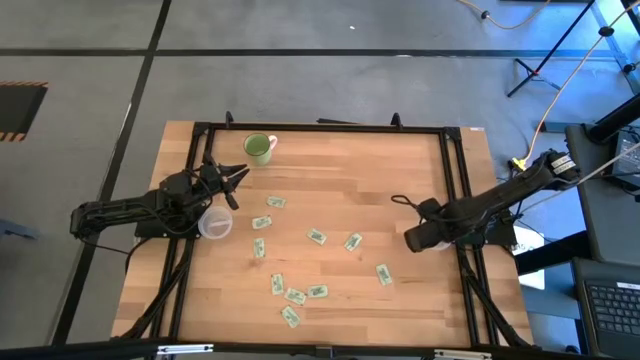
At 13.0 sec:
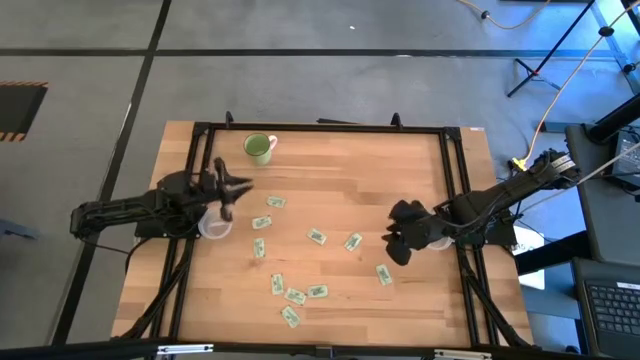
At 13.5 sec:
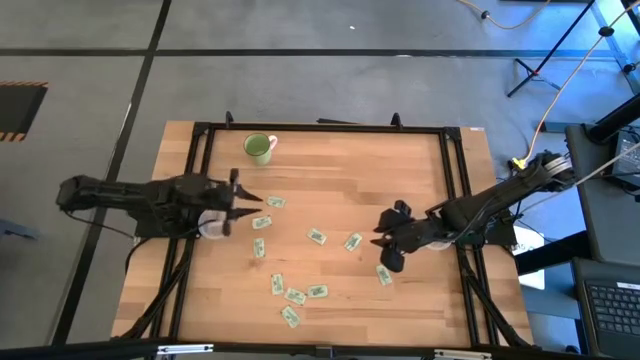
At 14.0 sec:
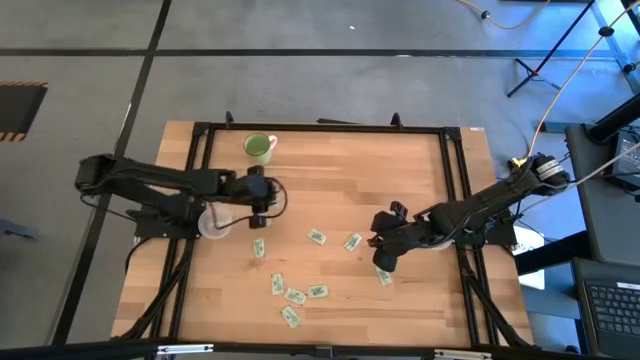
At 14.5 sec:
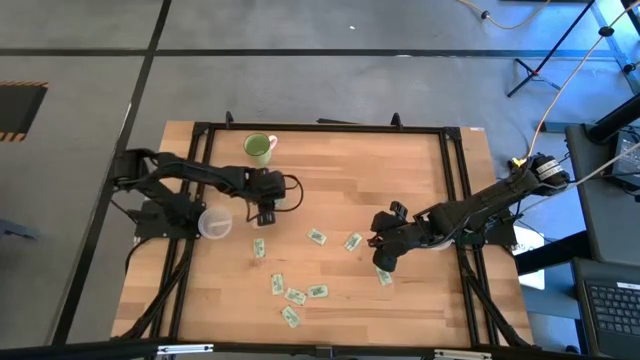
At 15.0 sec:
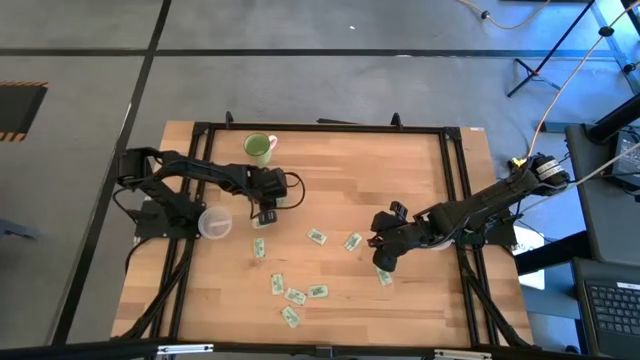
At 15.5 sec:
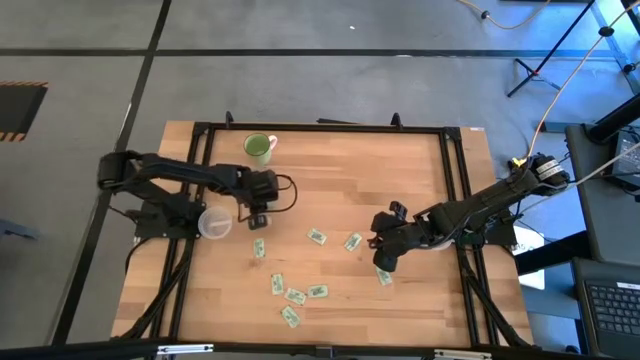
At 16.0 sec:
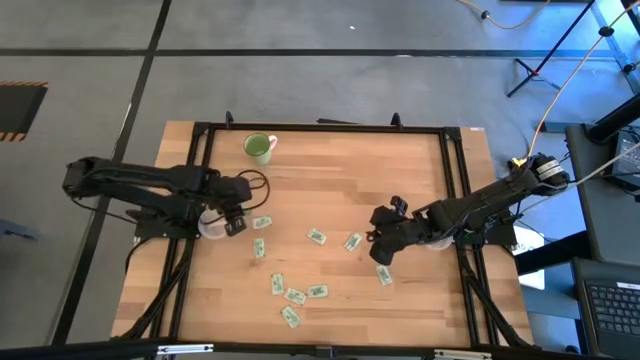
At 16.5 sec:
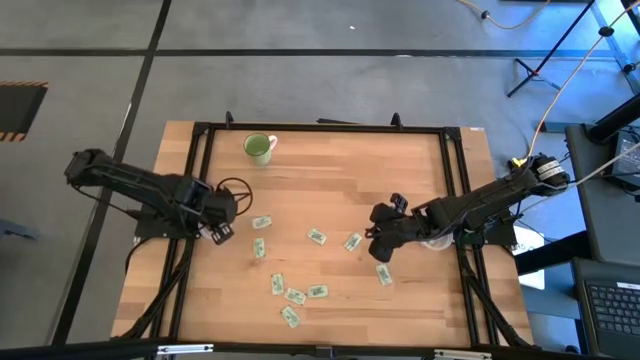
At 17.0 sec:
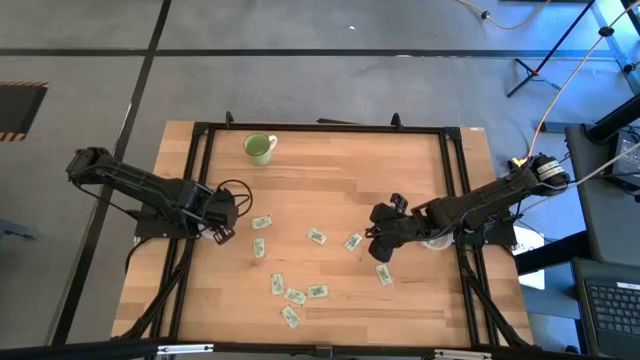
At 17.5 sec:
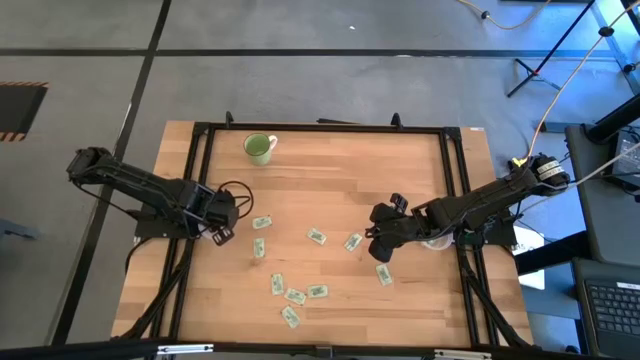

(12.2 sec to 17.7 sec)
Task: Pick and place items into bin
Put the white stevia packet into the left transparent bin

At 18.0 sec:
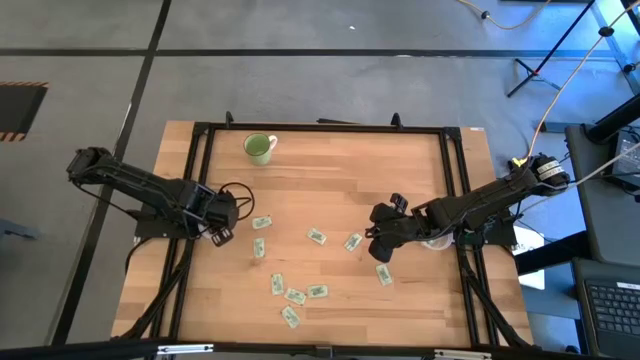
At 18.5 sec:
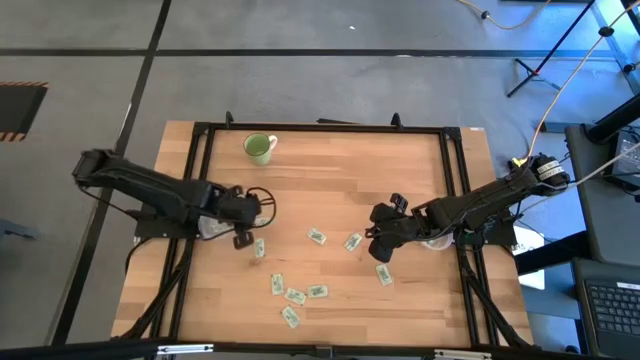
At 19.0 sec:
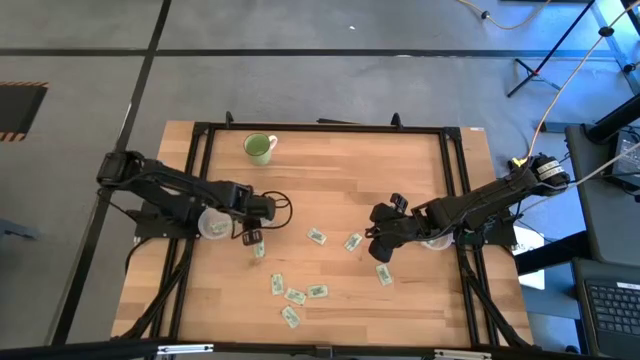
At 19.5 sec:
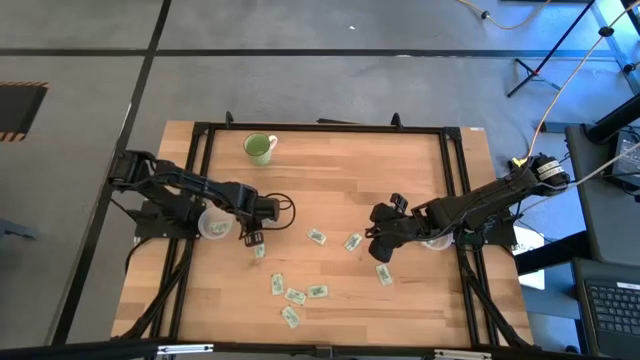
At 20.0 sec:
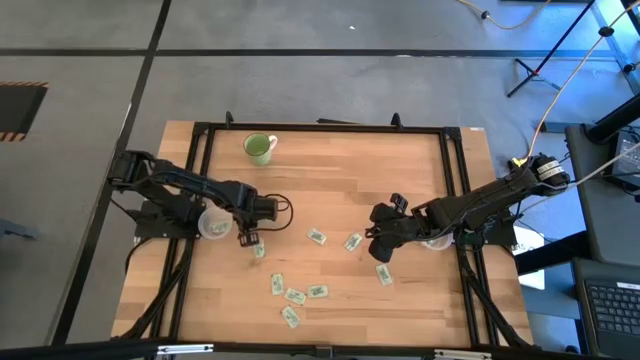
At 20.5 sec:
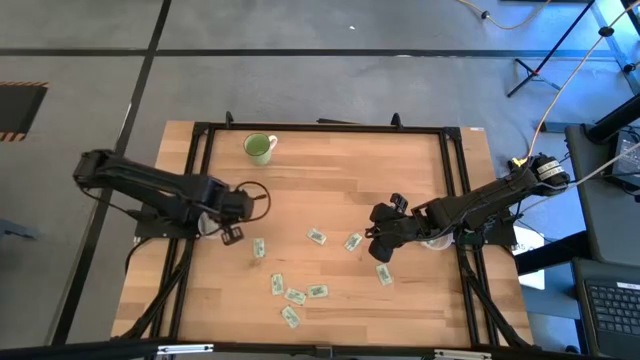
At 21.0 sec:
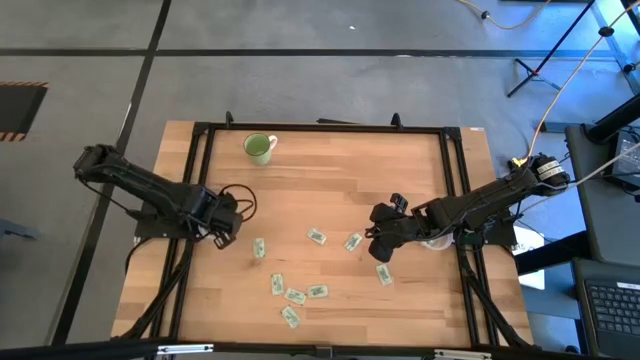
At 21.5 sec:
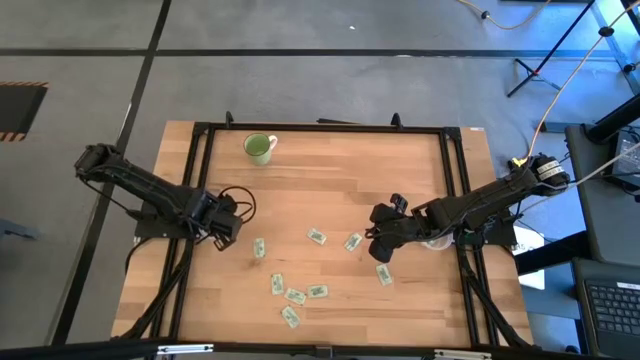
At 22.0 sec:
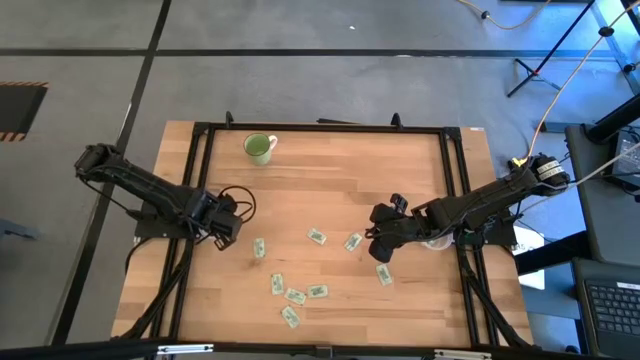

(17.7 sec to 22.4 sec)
Put the white stevia packet into the left transparent bin

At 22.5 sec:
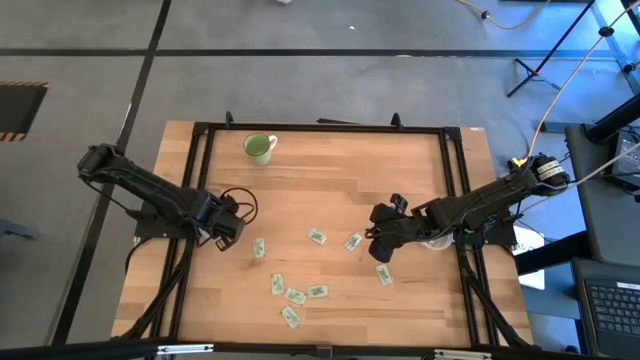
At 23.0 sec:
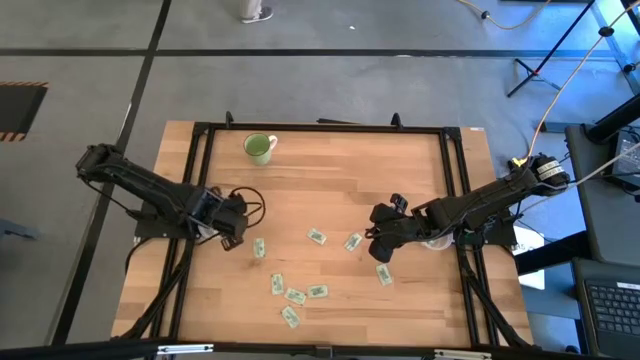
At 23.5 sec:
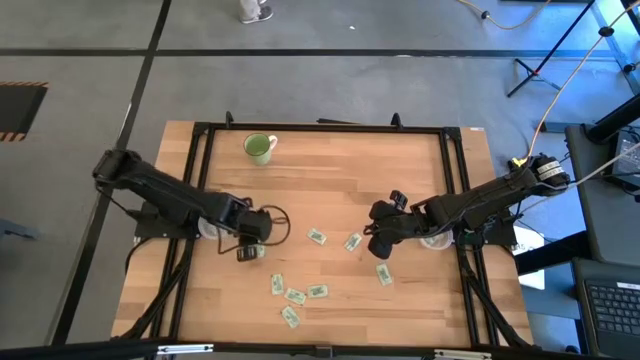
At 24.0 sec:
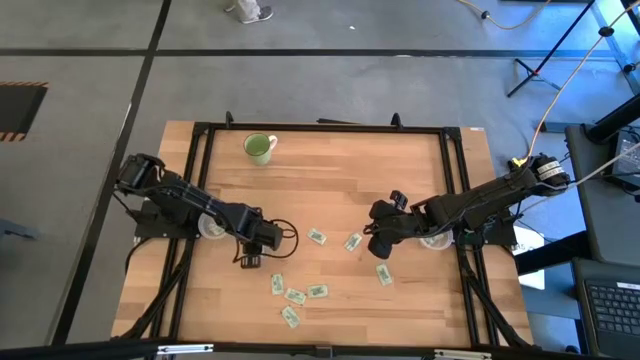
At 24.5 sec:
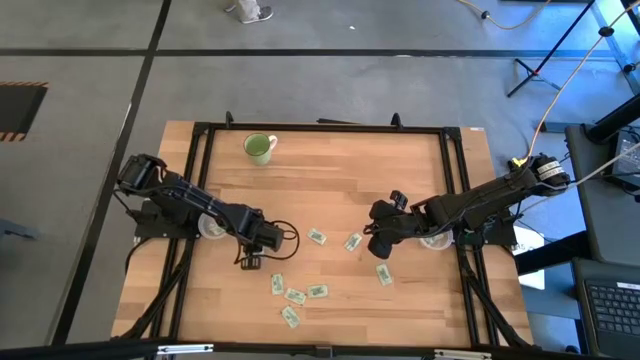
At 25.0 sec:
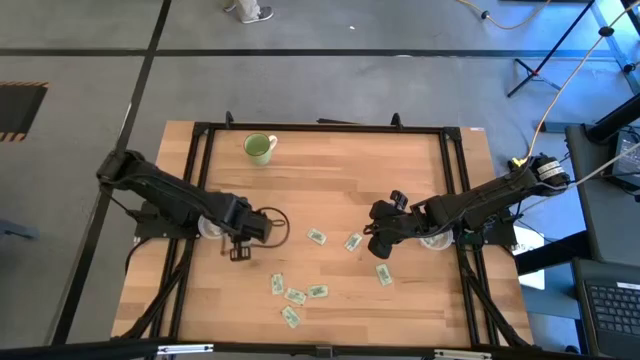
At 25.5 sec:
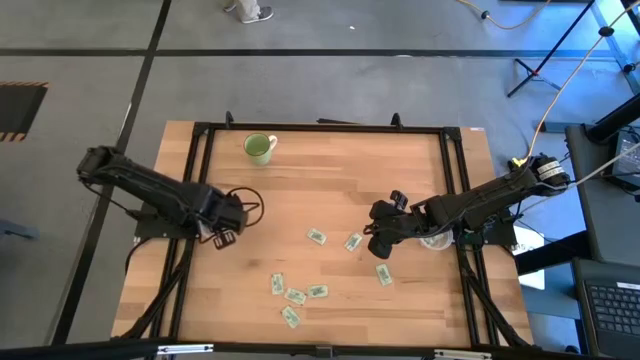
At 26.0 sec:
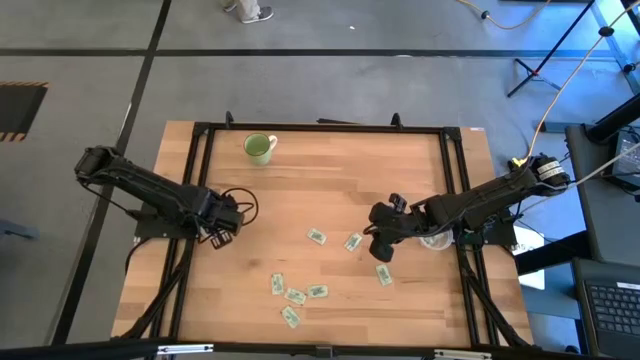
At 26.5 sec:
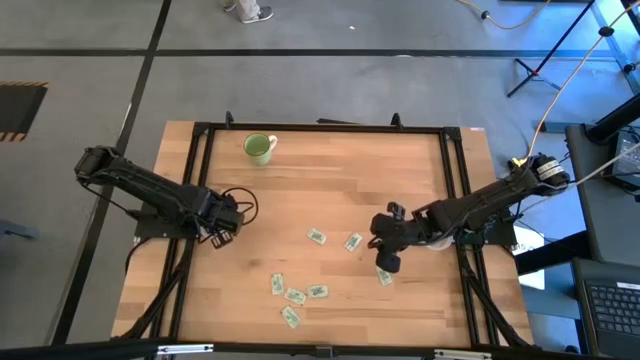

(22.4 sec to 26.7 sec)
Put the white stevia packet into the left transparent bin

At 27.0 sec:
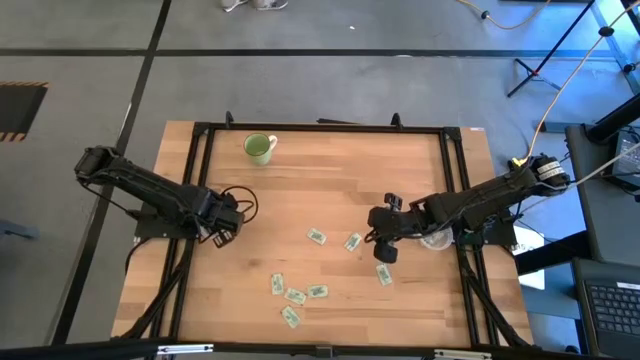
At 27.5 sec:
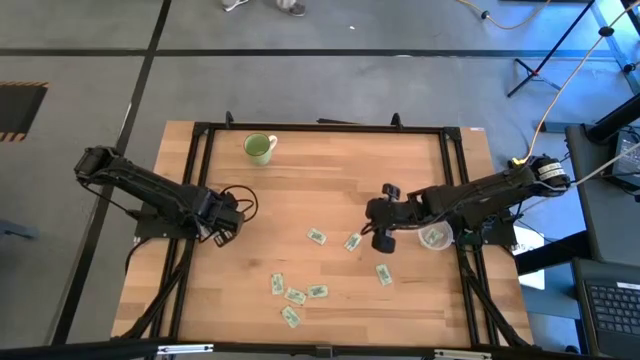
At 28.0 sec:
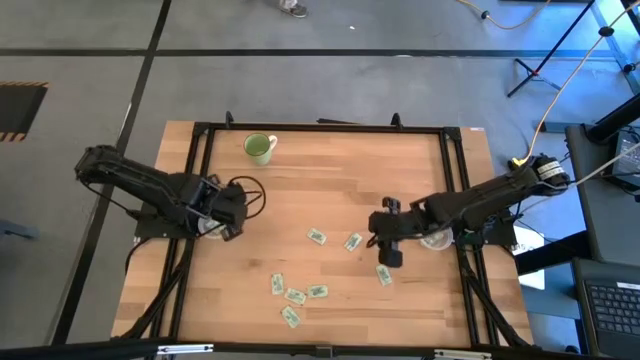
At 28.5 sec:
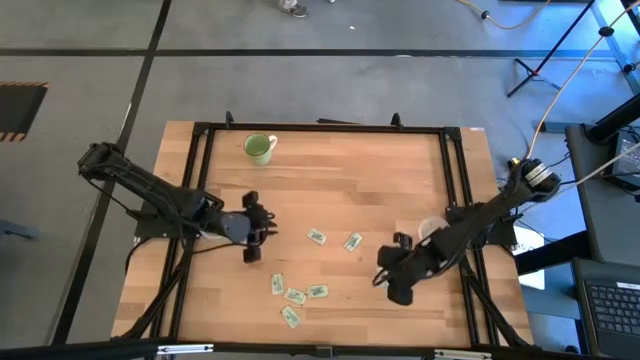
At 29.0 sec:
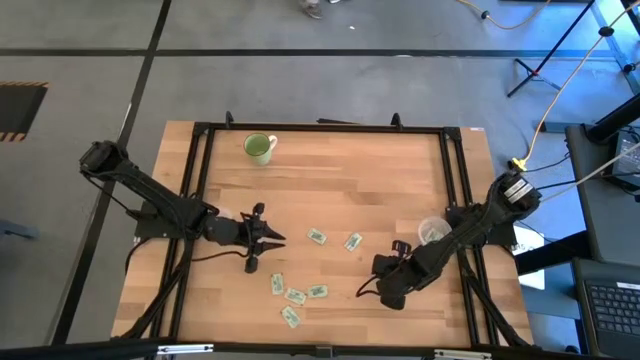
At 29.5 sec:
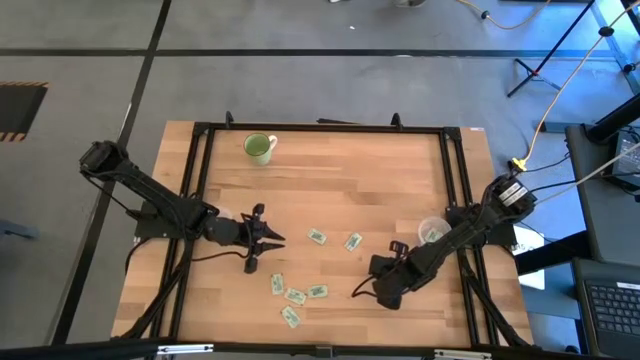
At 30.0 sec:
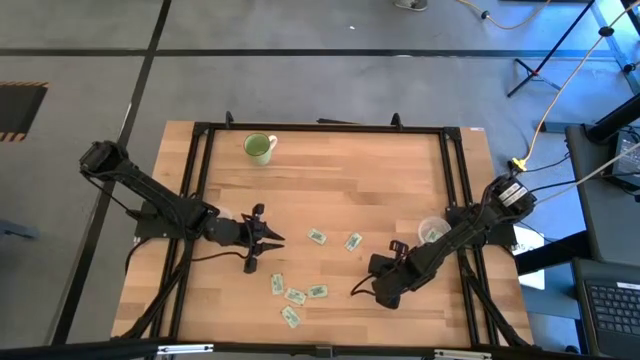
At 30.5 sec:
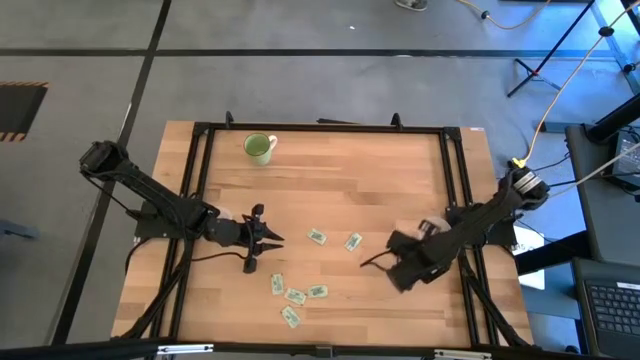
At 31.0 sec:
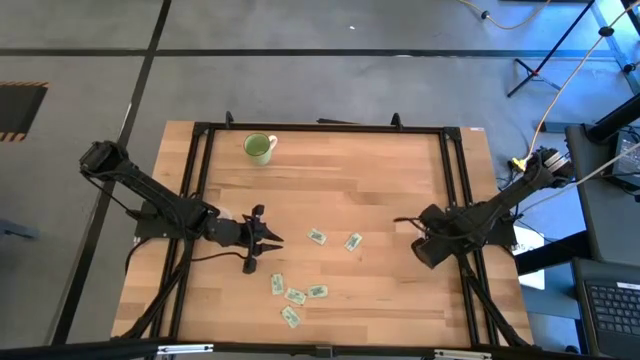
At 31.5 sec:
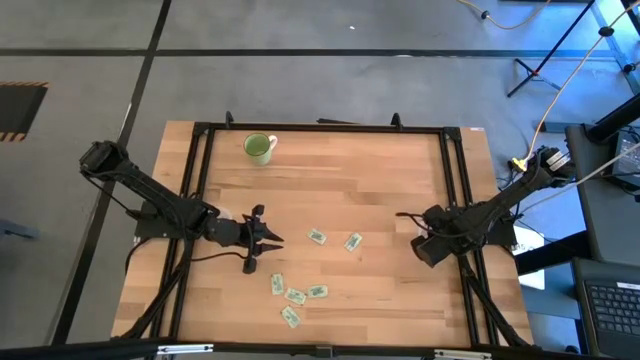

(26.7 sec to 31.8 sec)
Put the white stevia packet into the right transparent bin

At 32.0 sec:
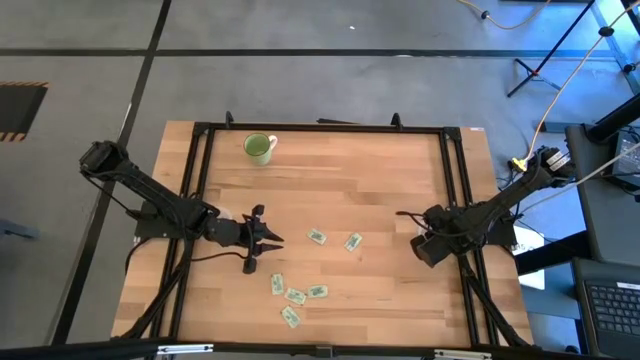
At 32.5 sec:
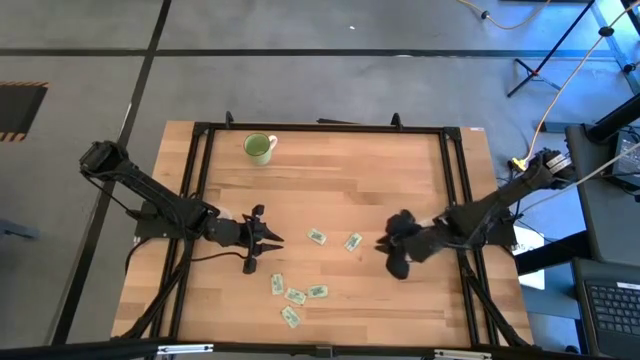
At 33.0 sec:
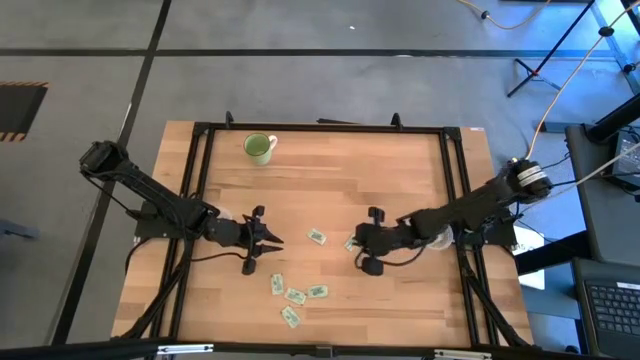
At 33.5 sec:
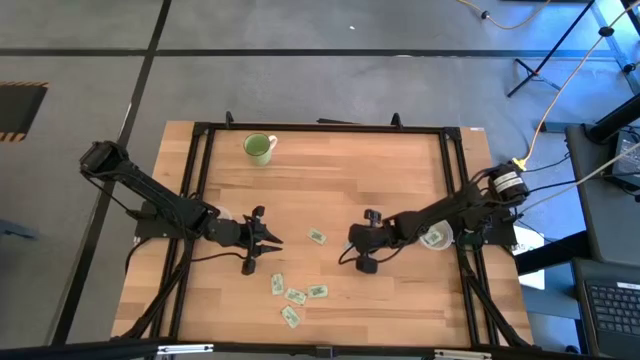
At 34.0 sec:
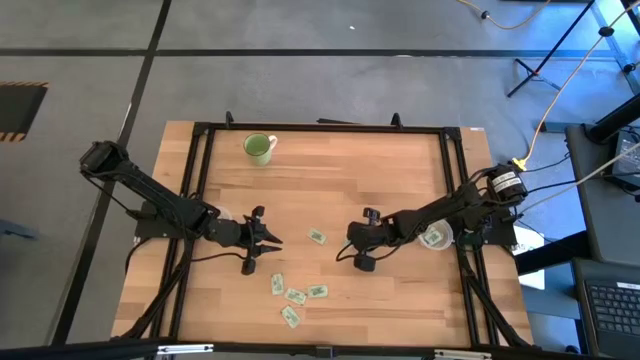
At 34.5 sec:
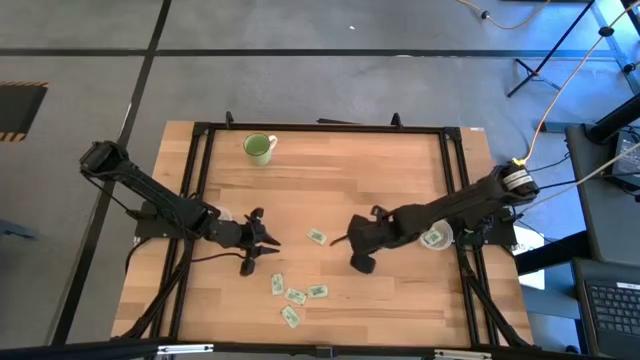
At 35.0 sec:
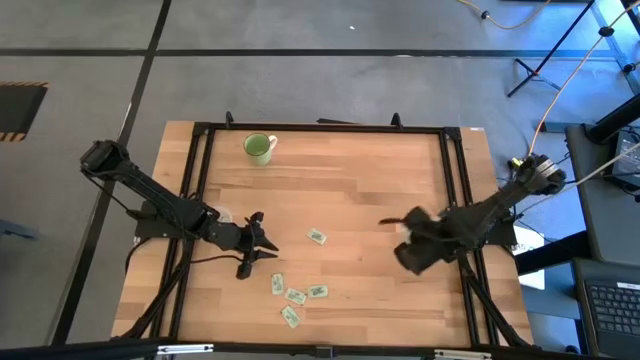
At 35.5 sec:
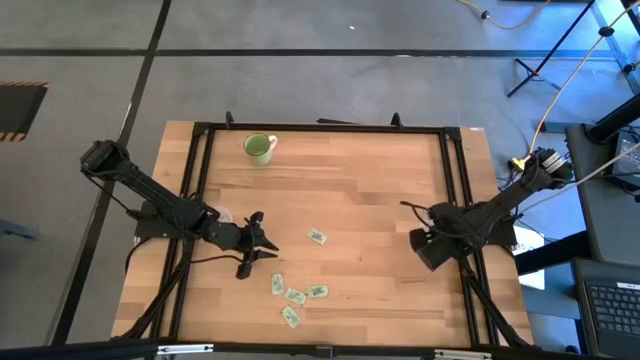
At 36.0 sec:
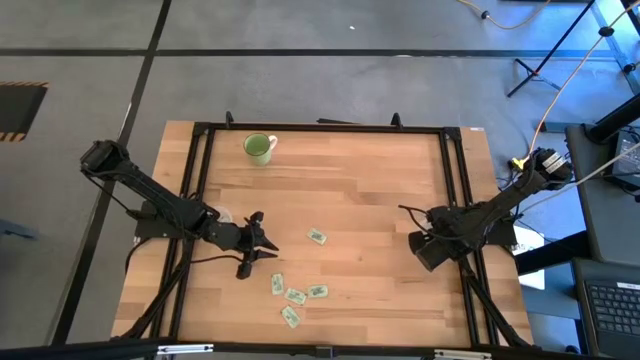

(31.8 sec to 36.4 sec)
Put the white stevia packet into the right transparent bin
